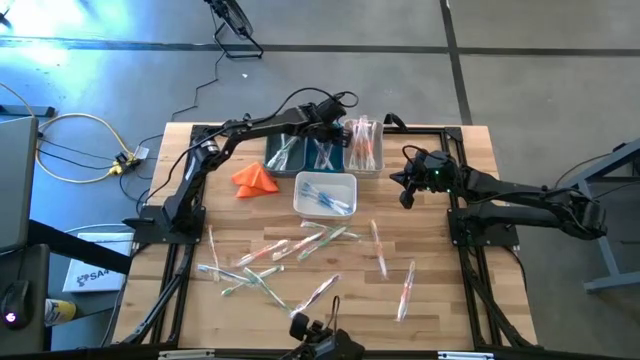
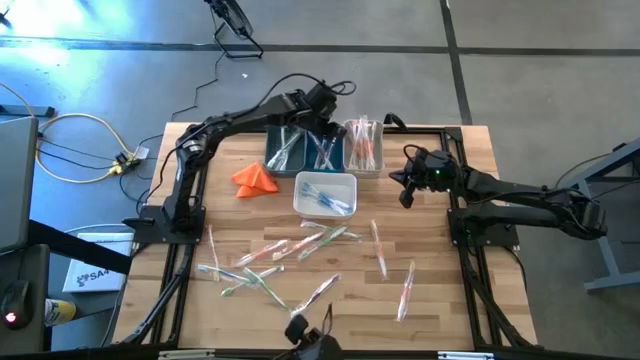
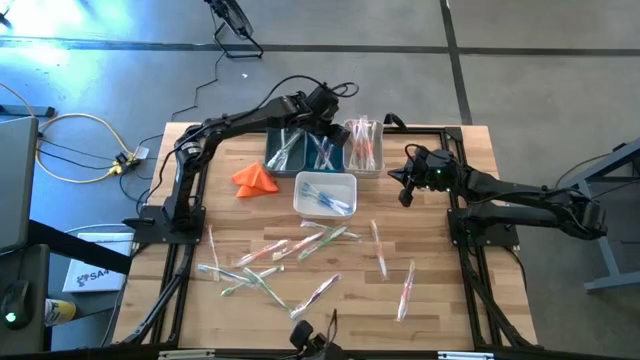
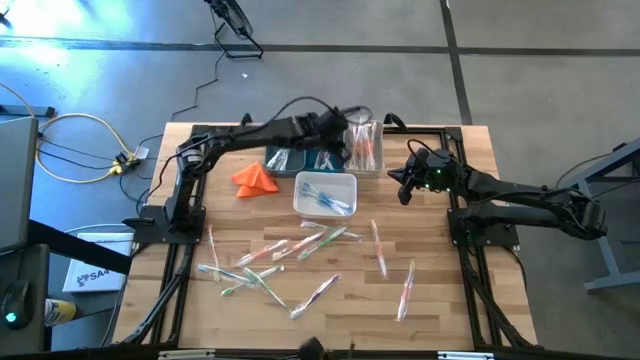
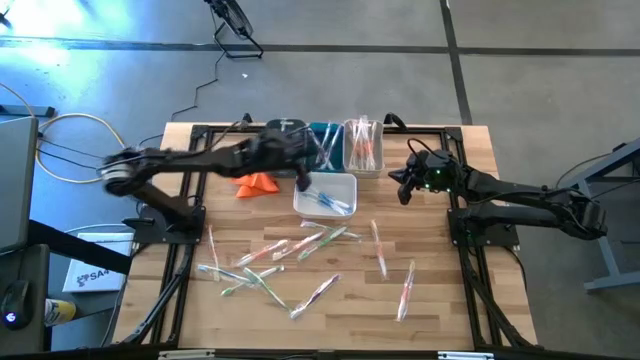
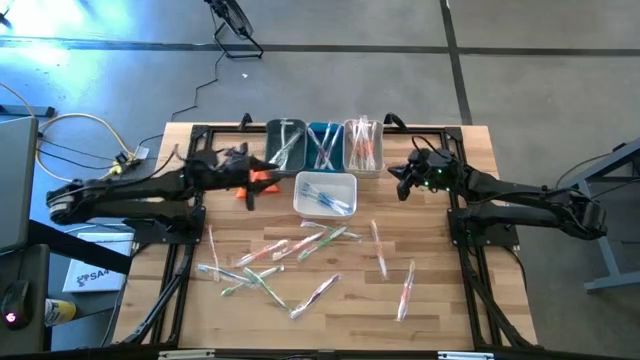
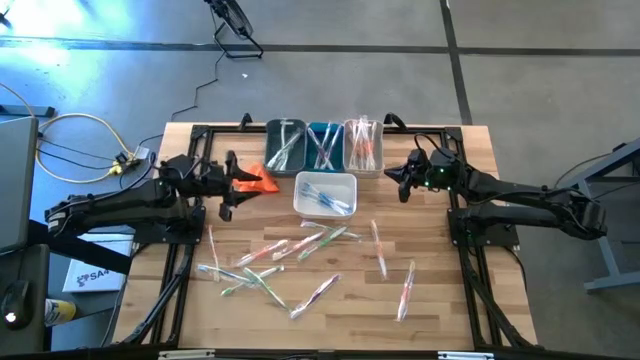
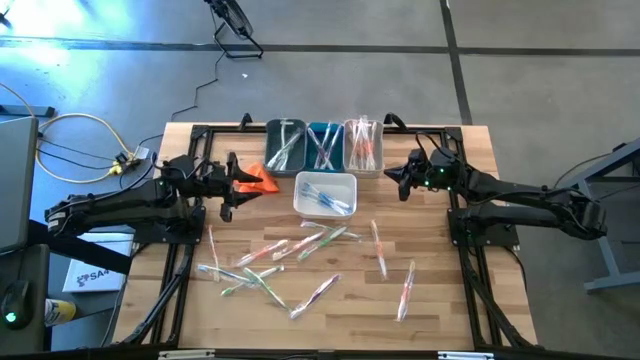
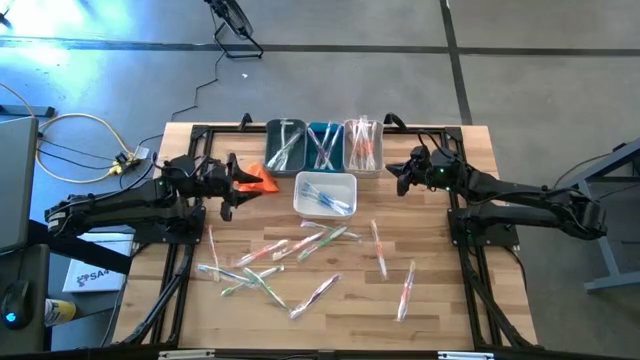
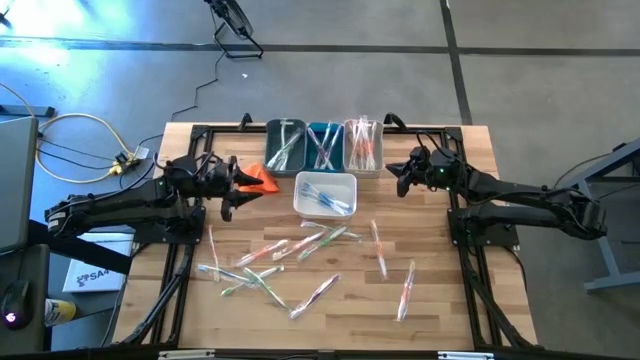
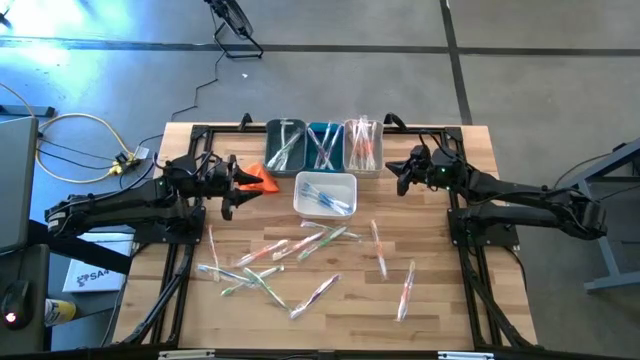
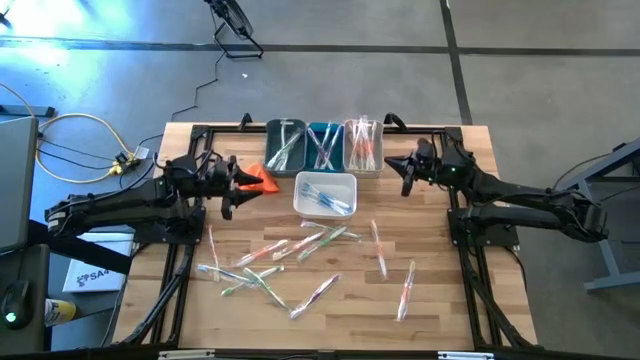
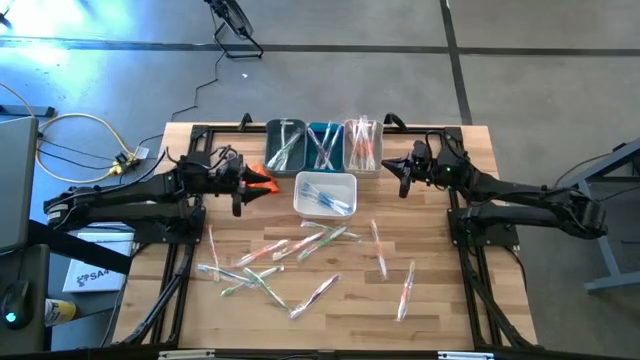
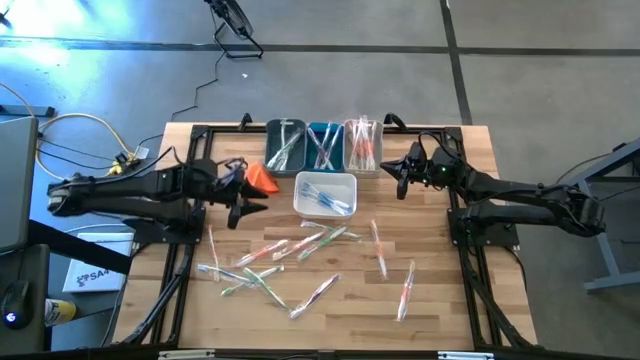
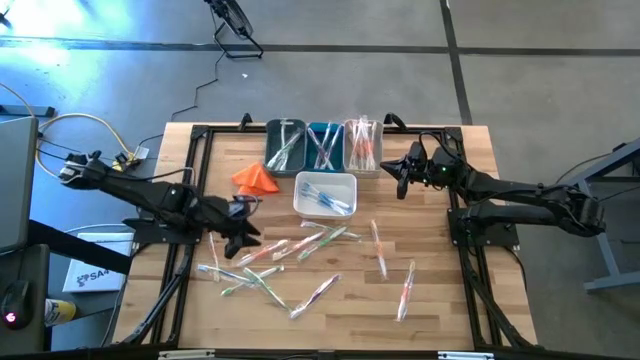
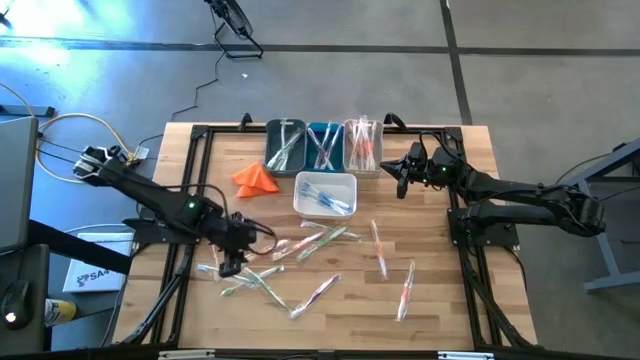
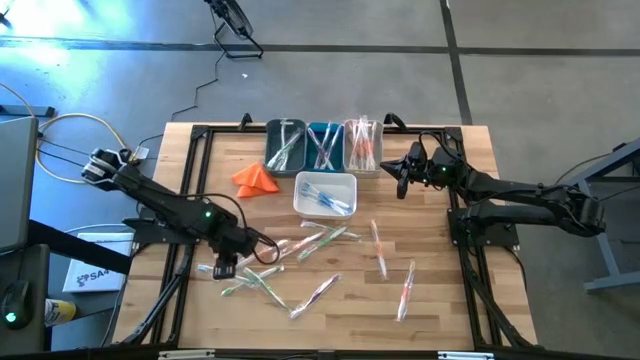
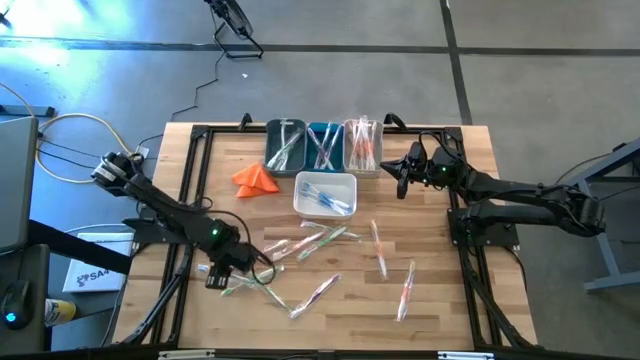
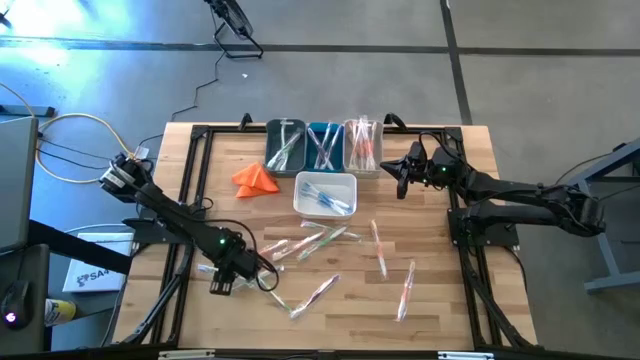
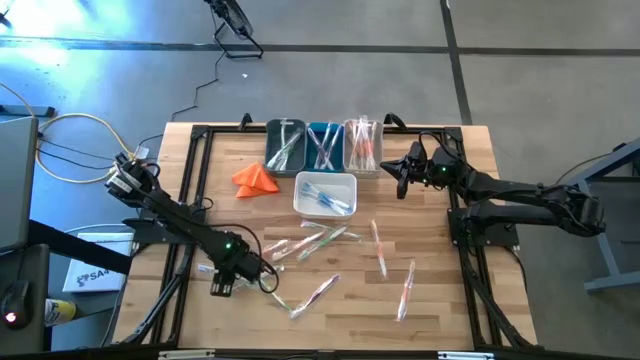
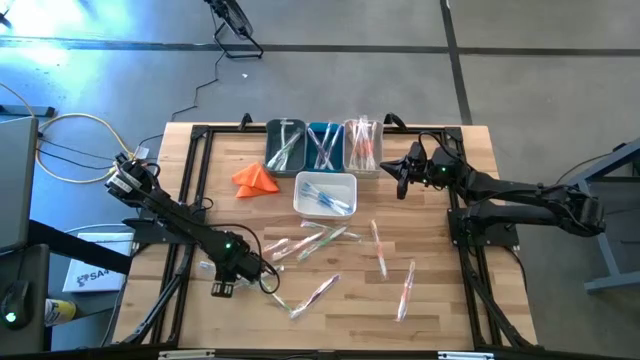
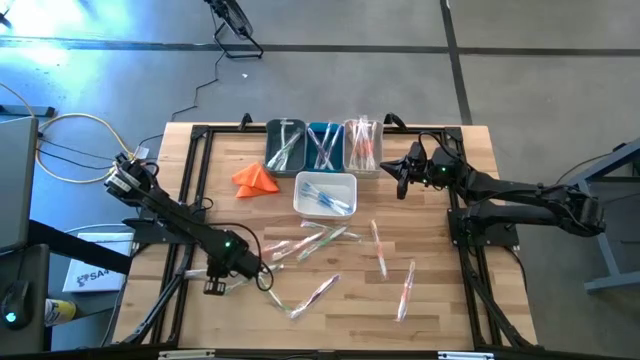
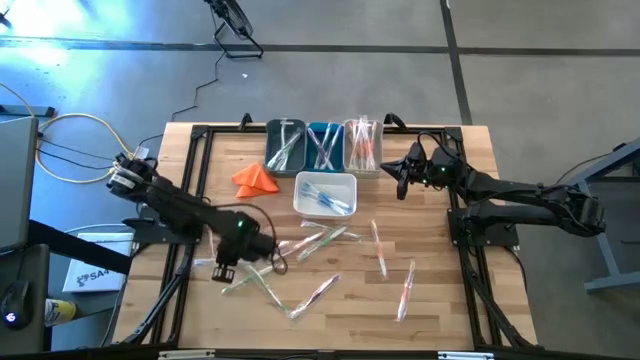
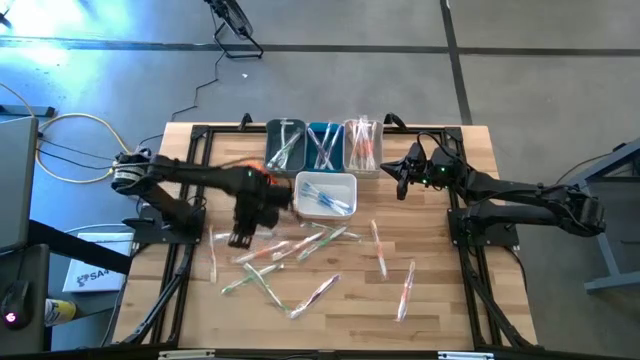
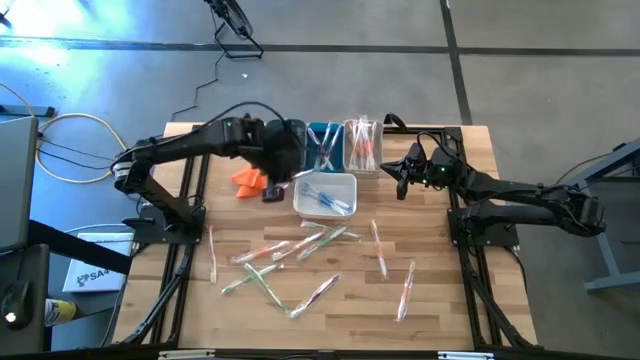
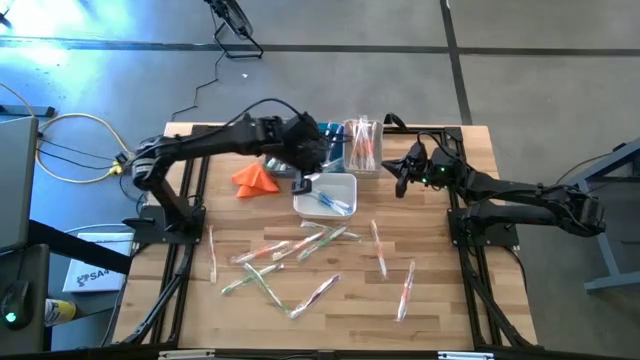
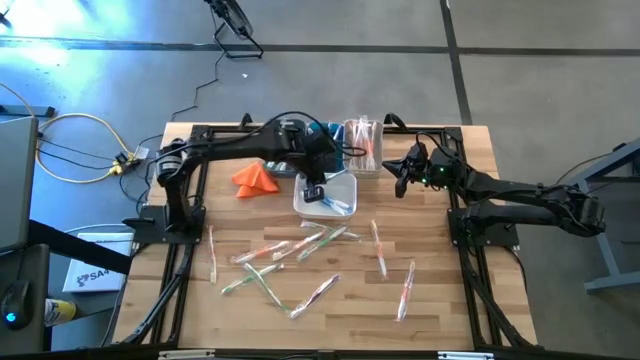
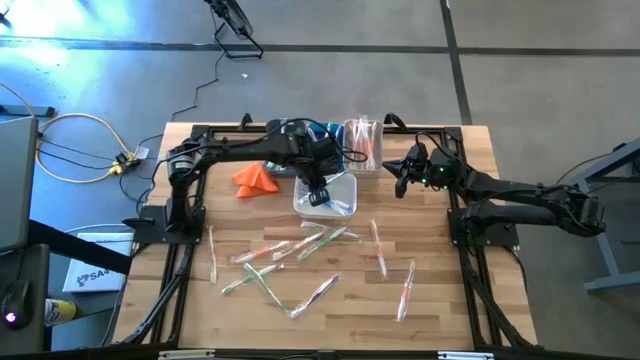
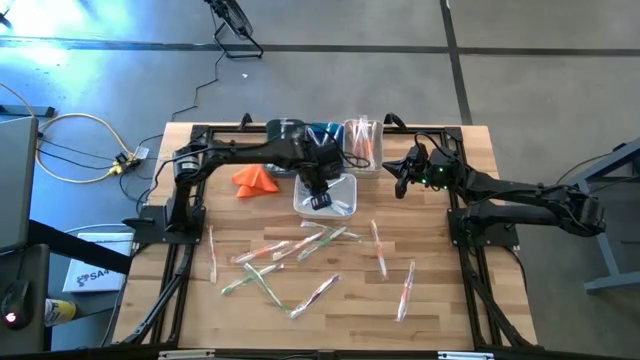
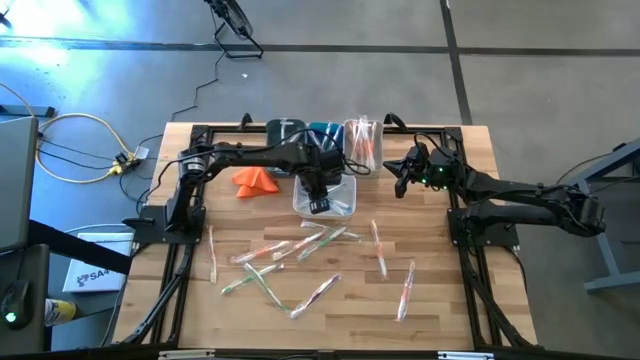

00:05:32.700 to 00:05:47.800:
Task: Pick & Place Toothbrushes
Put the blue toothbrush into the white bin

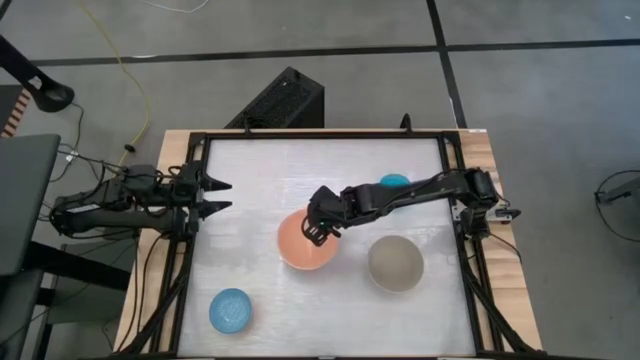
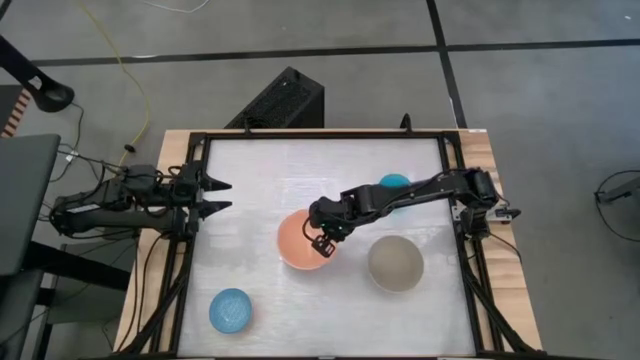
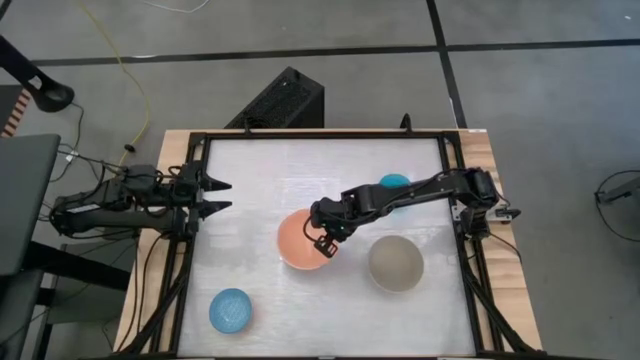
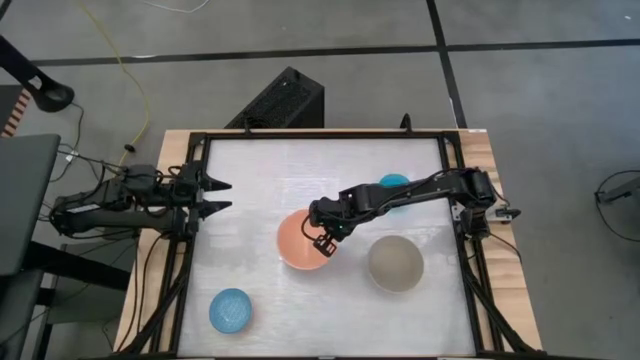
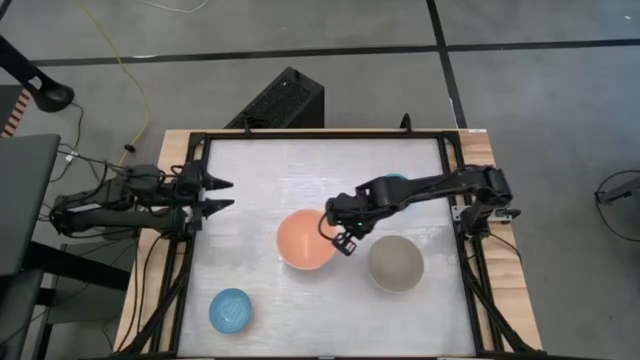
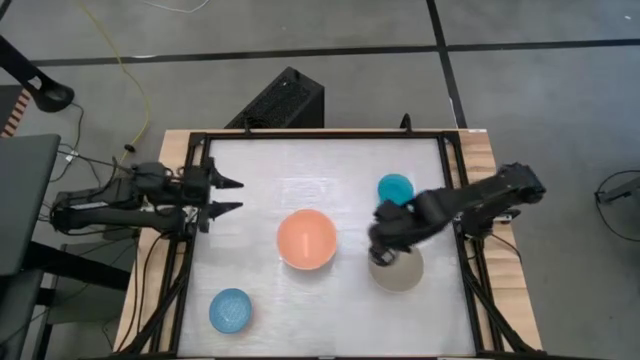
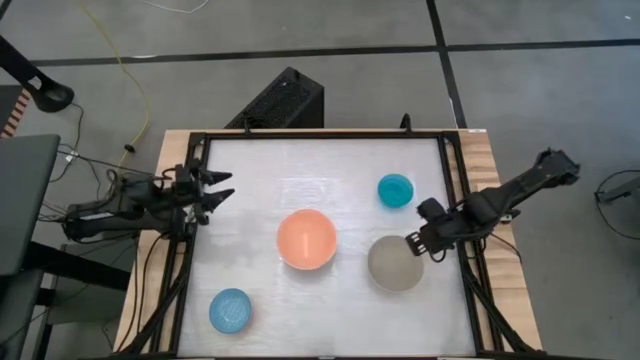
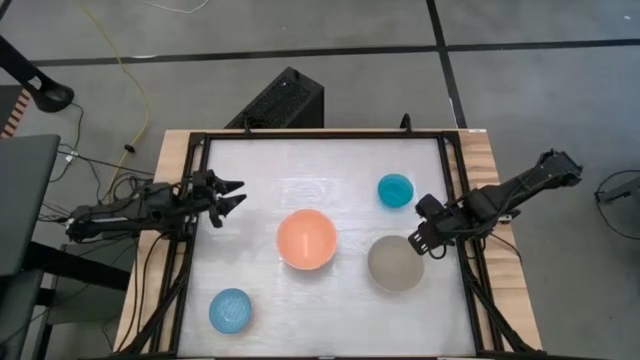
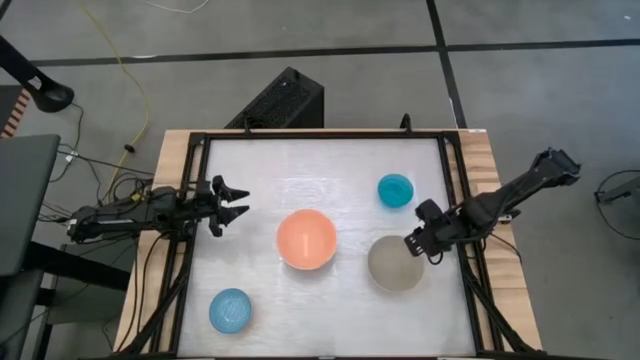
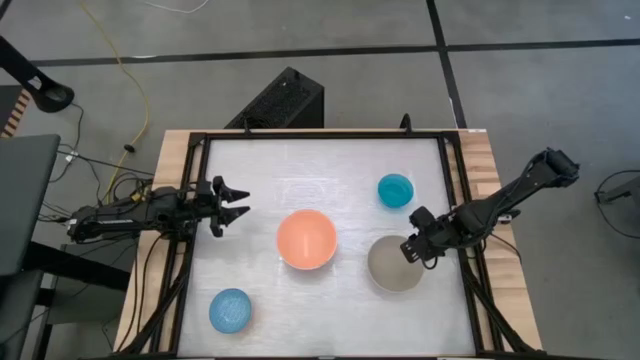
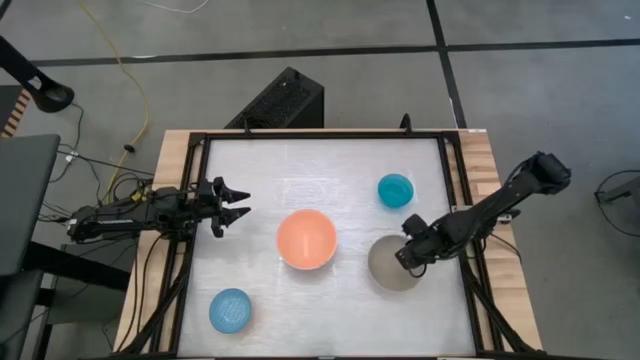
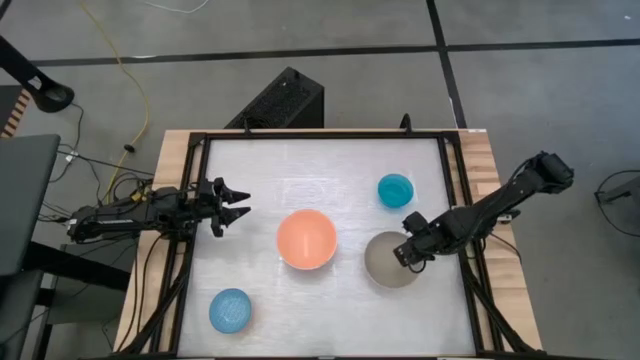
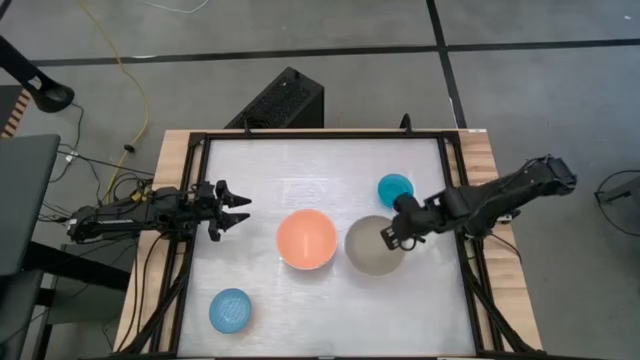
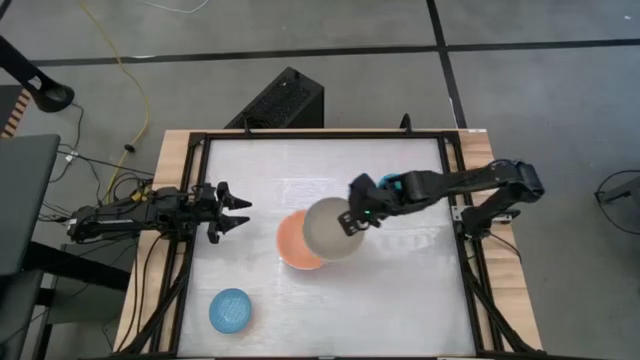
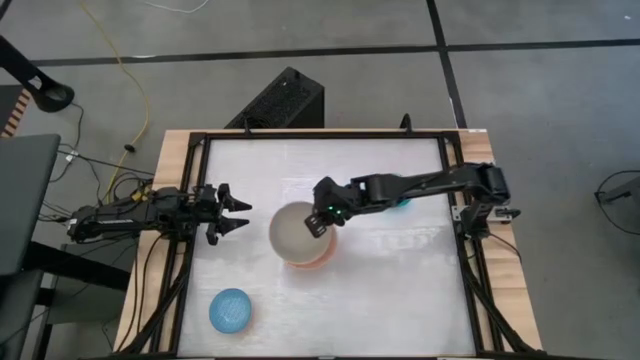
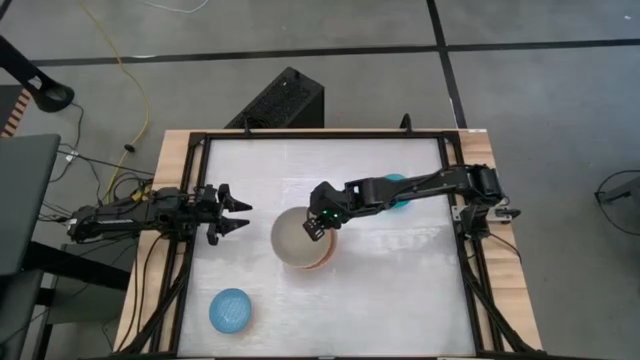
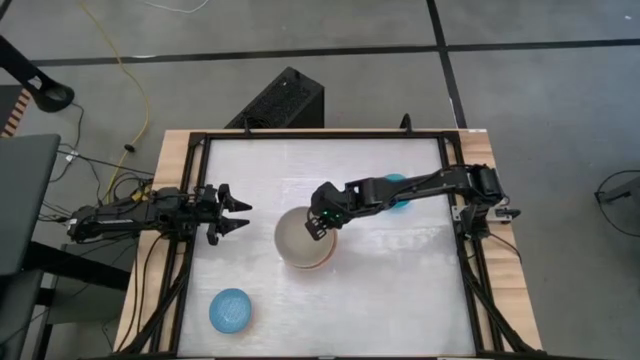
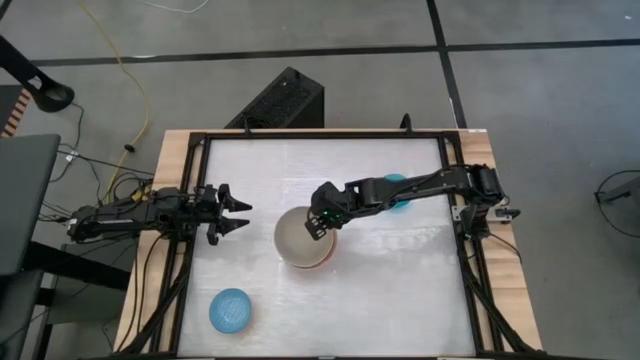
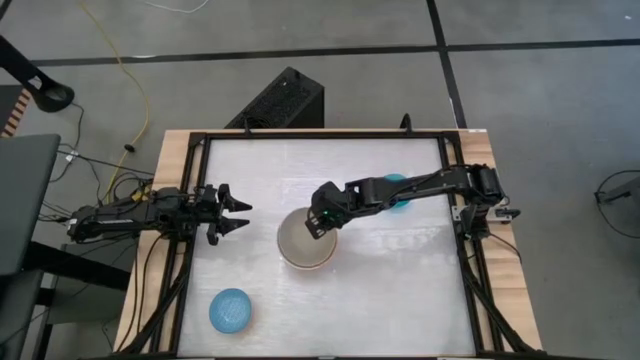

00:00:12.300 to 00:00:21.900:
Task: Nest bowls inside each other by size order
Stack the gray bowl on top of the transparent orange bowl
